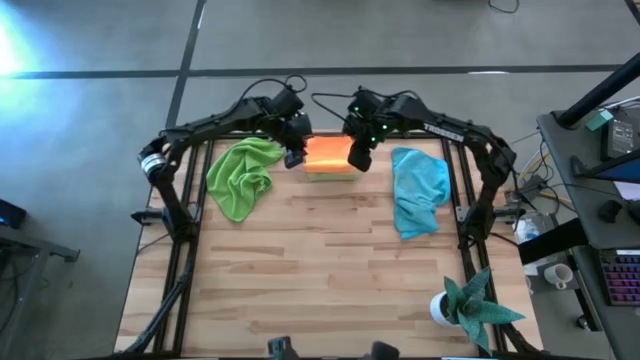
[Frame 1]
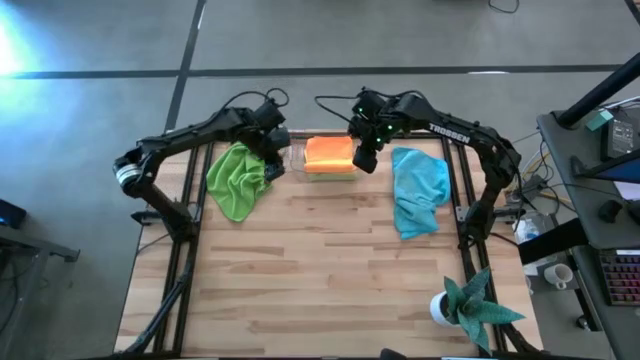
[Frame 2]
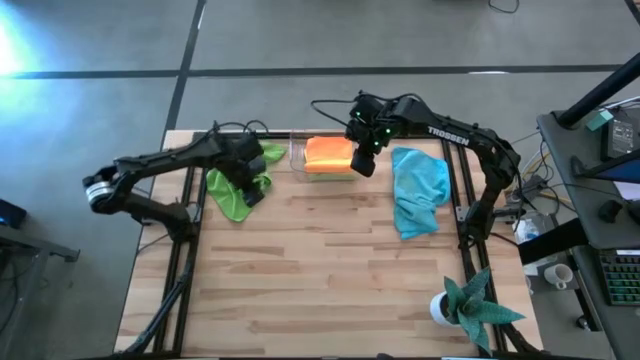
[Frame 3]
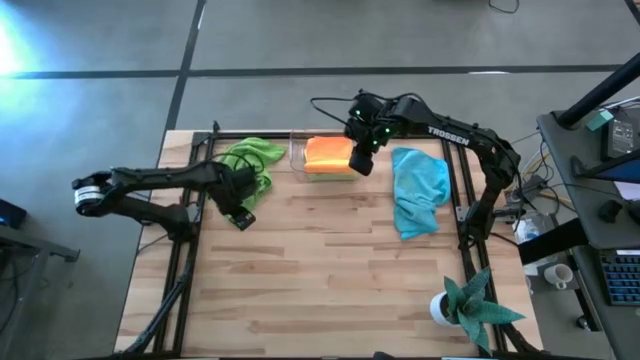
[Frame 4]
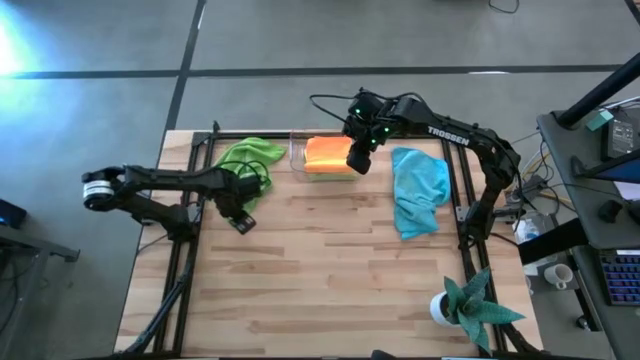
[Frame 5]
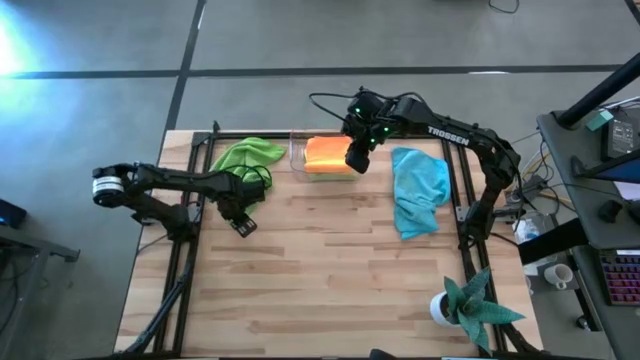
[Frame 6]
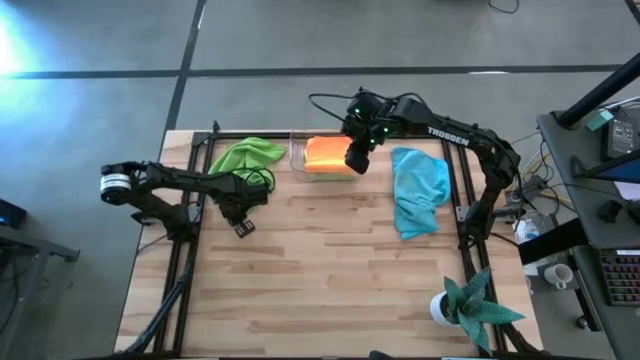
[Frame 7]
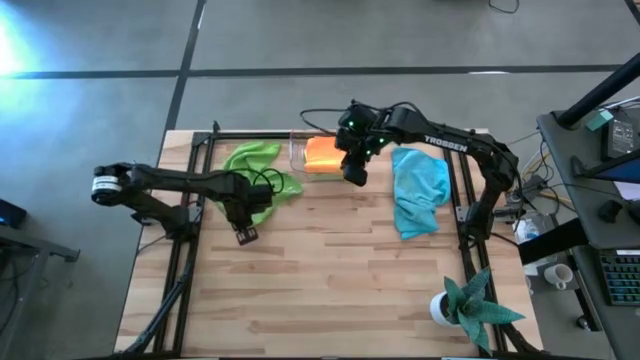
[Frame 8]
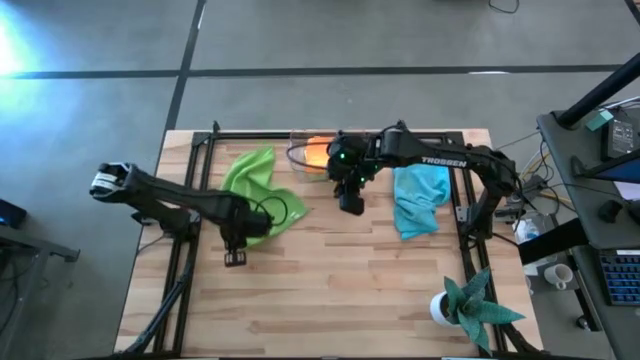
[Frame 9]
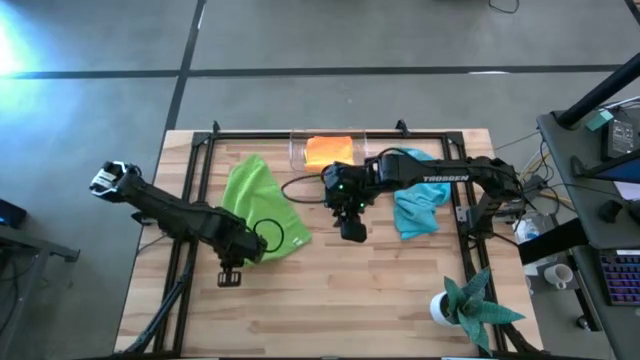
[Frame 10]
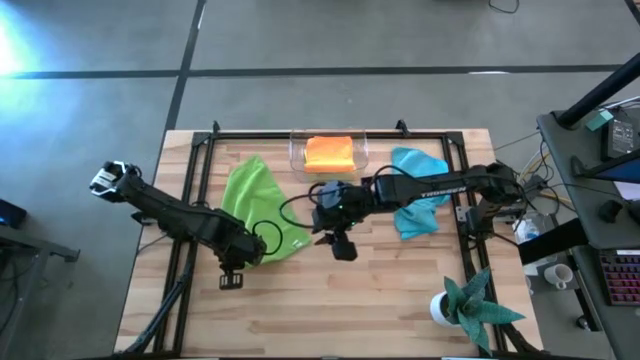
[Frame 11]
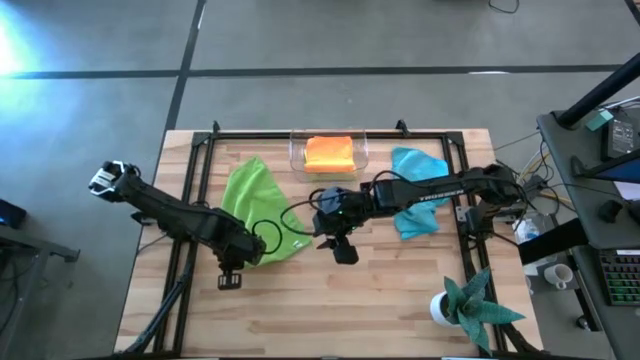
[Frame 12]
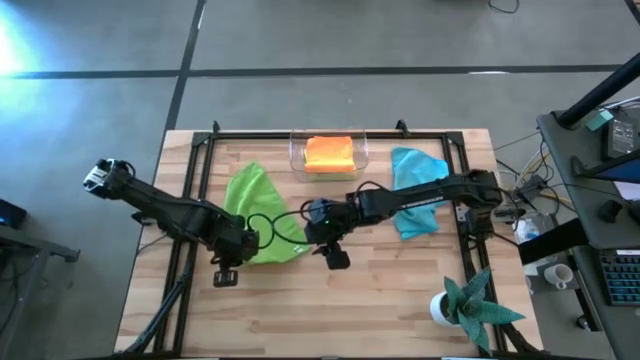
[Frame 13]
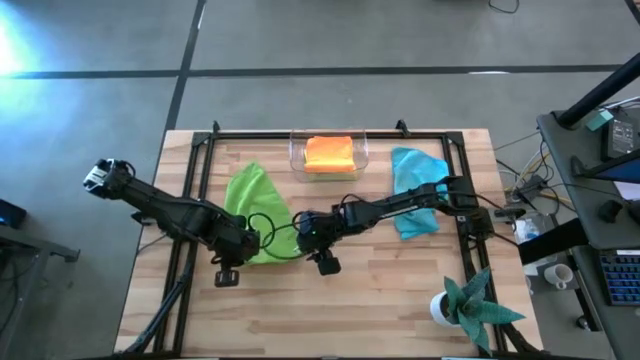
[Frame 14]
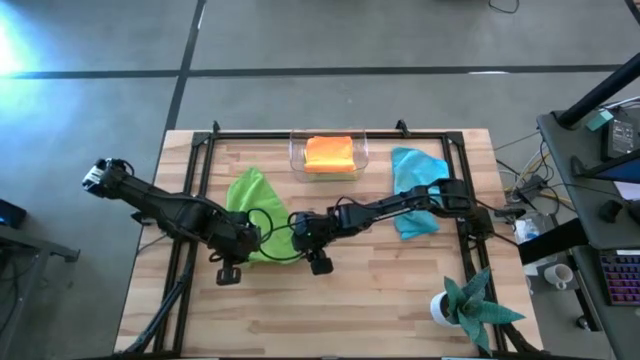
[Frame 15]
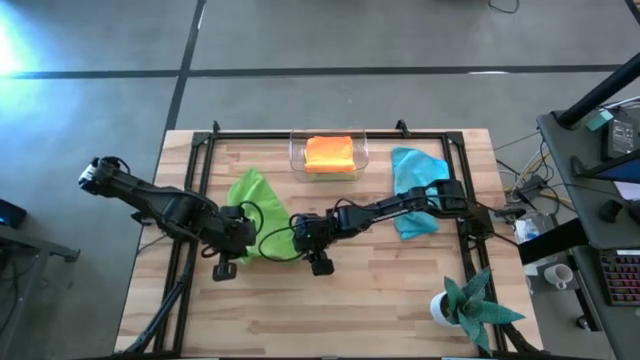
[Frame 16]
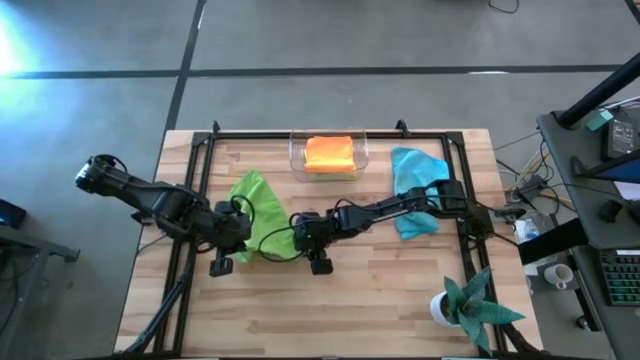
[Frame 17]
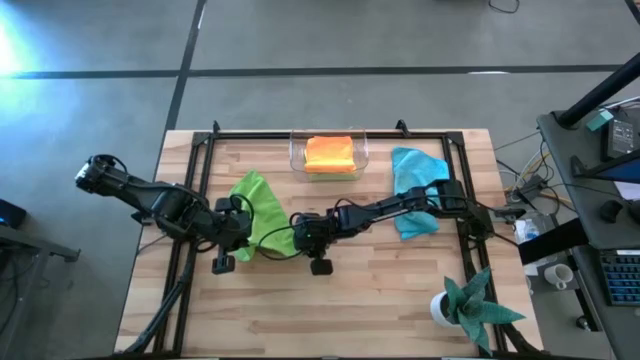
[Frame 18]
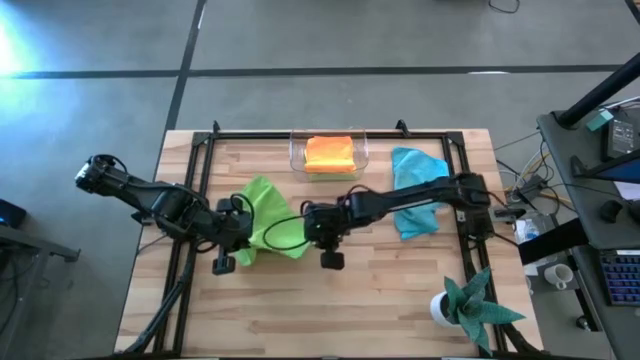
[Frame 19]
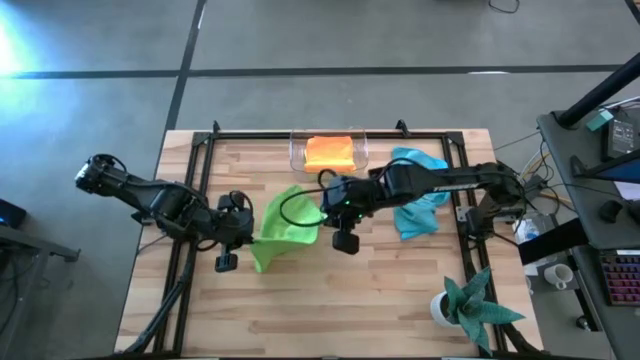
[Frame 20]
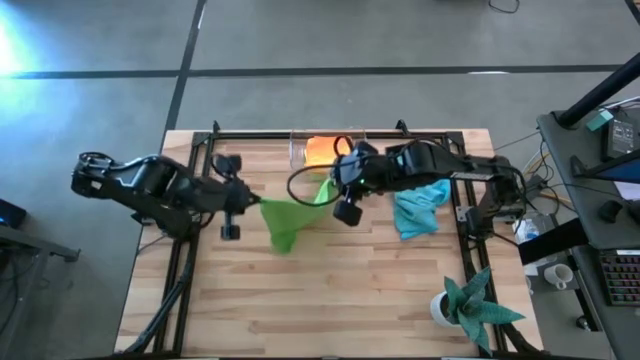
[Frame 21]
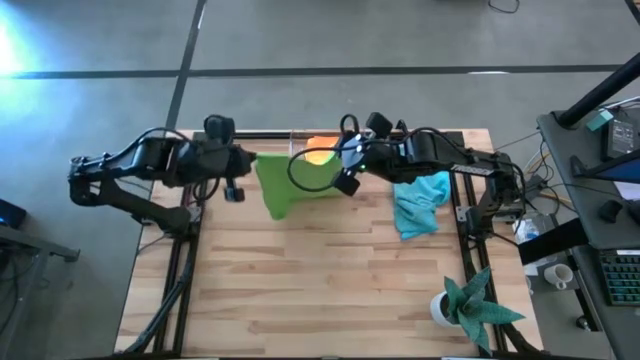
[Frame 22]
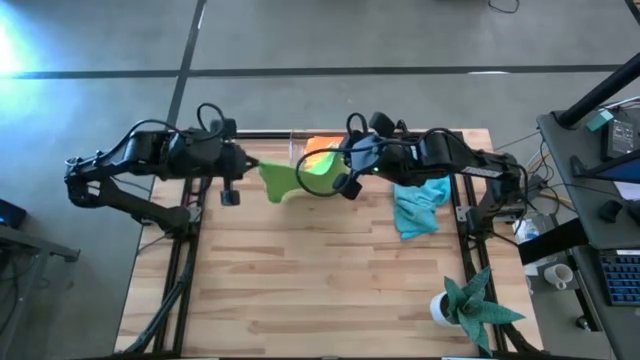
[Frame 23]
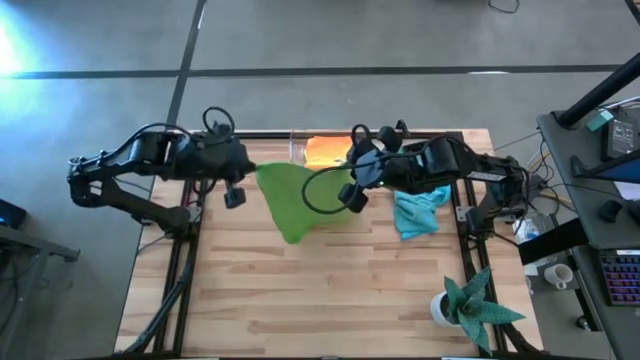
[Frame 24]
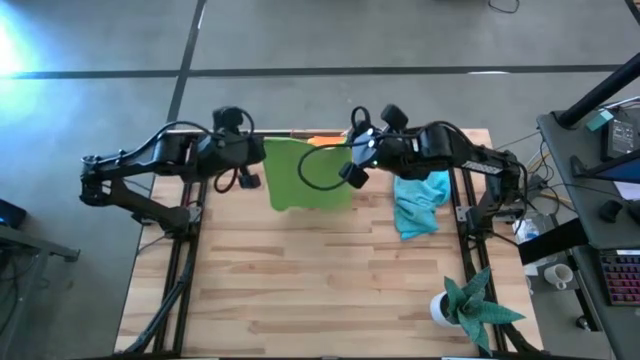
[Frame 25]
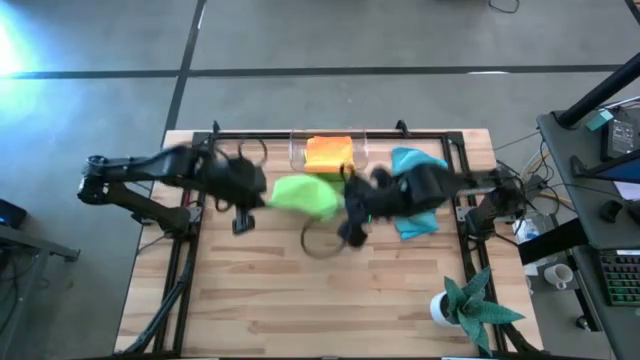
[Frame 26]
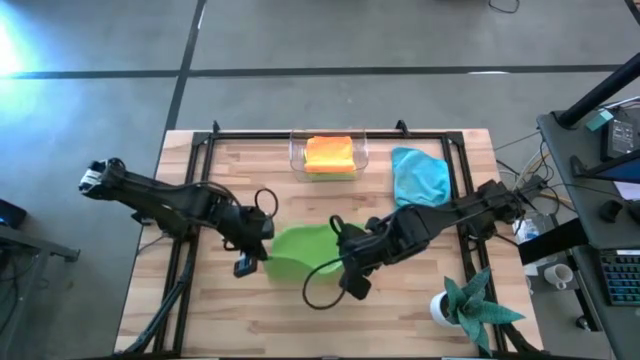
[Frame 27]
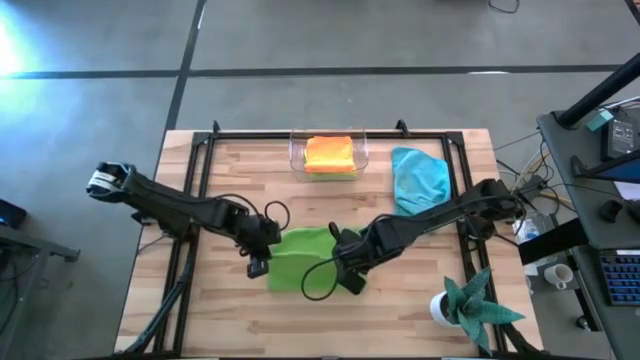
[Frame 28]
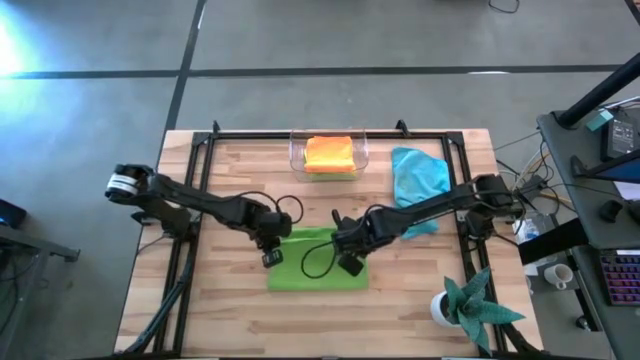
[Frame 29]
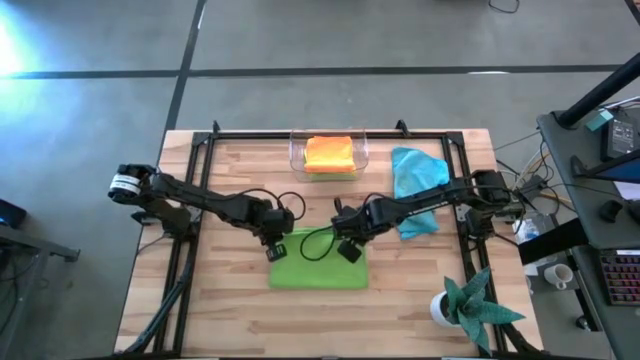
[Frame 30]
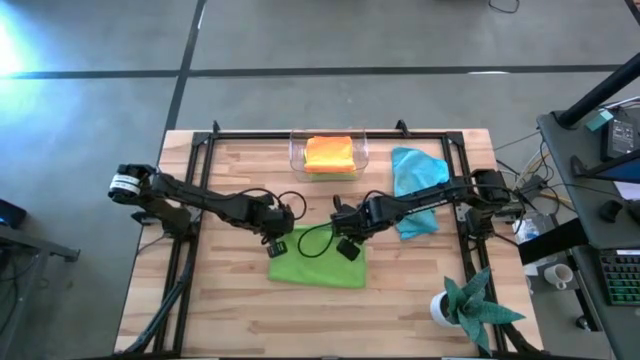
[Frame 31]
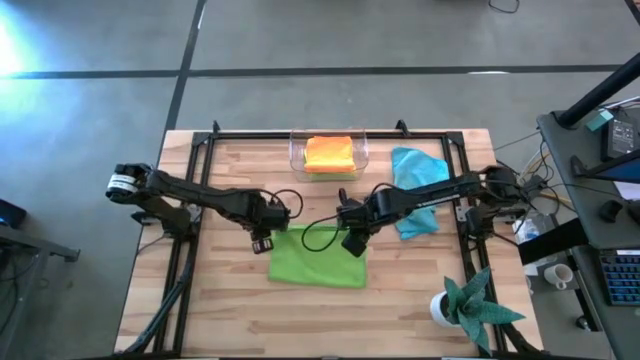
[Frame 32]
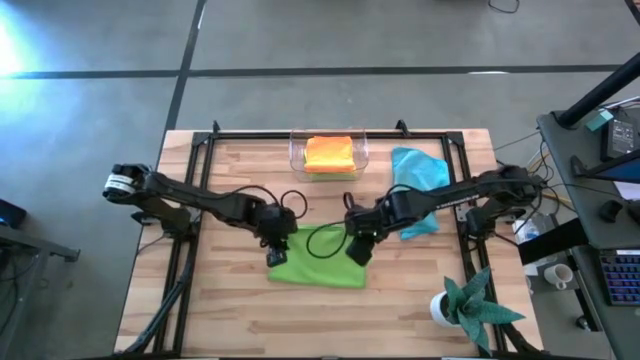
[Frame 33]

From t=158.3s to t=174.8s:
Task: Fold microfiber towels
Fold the green microfiber towel

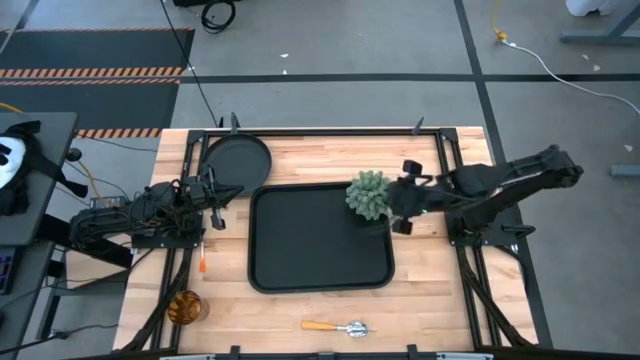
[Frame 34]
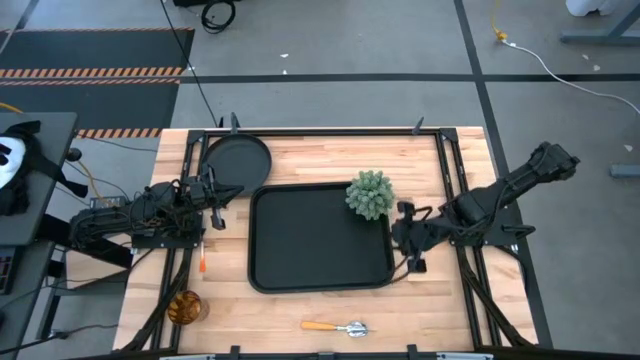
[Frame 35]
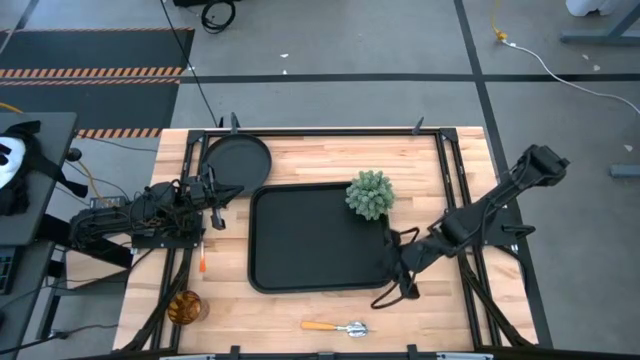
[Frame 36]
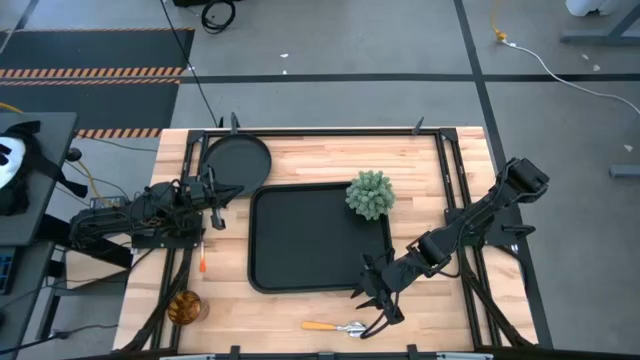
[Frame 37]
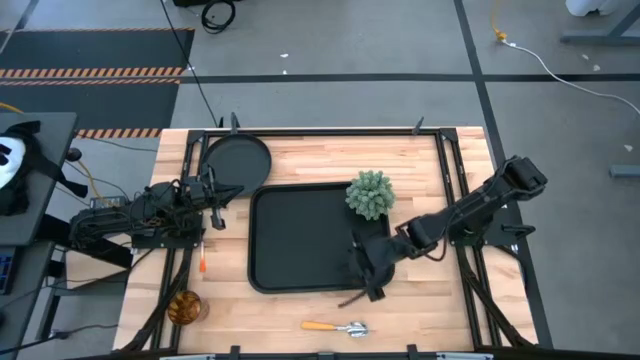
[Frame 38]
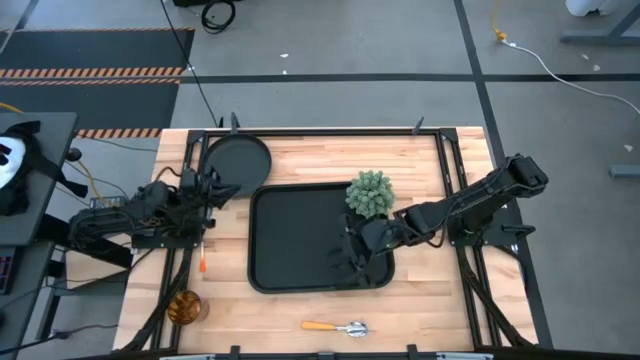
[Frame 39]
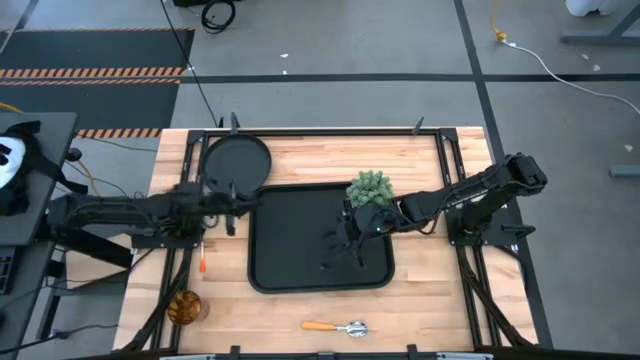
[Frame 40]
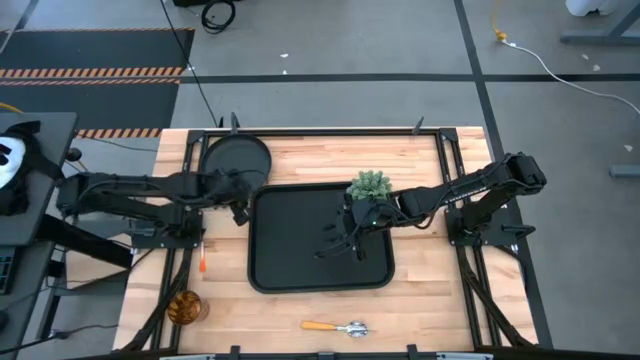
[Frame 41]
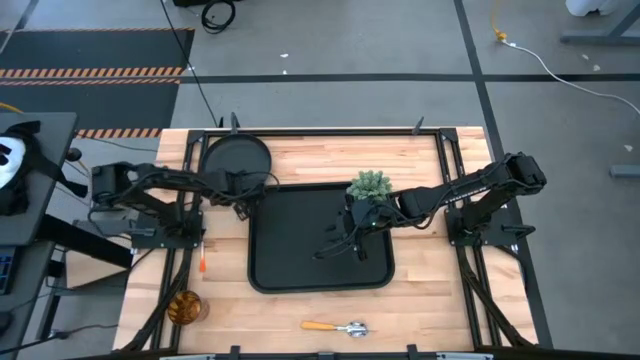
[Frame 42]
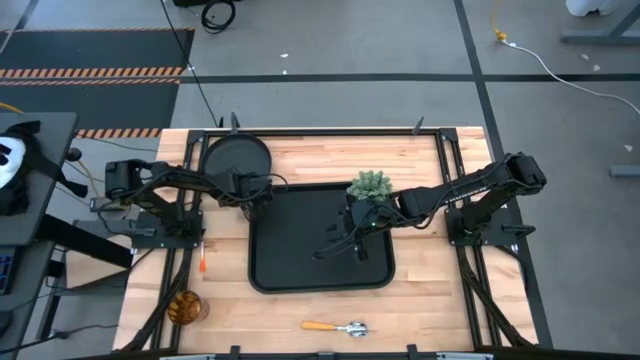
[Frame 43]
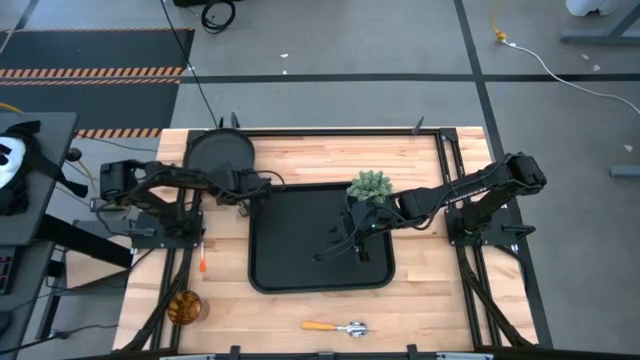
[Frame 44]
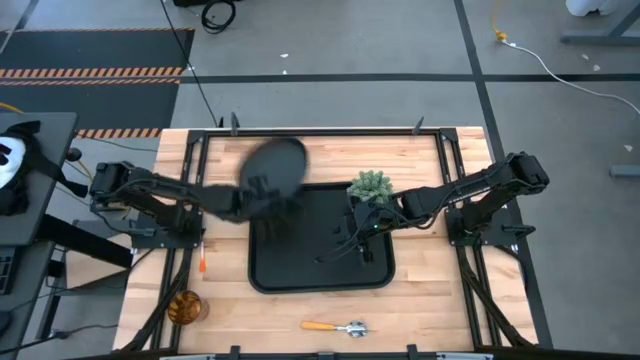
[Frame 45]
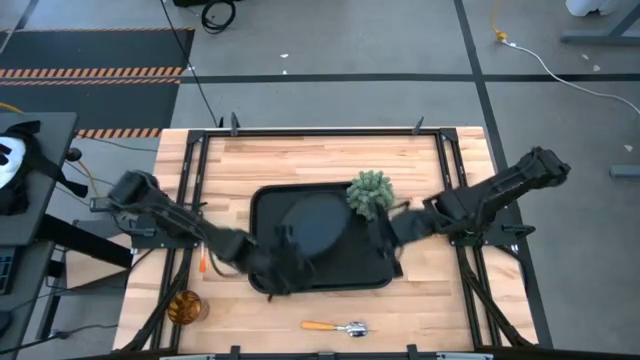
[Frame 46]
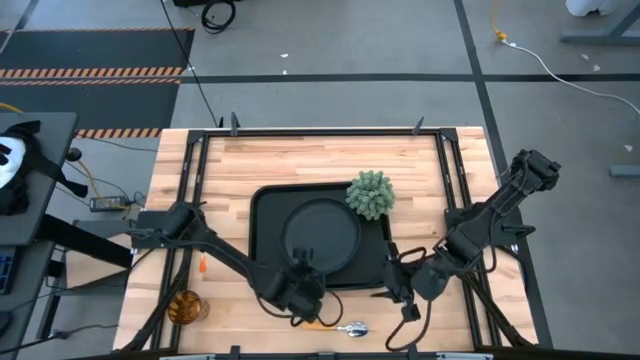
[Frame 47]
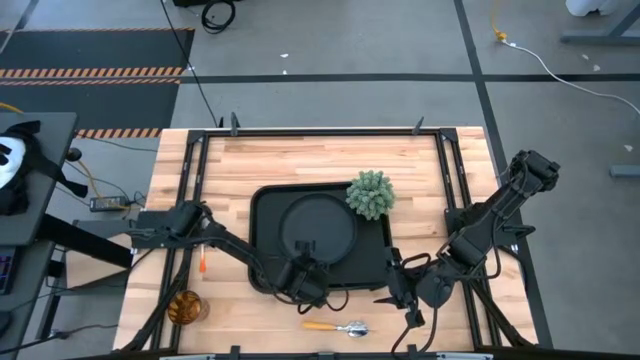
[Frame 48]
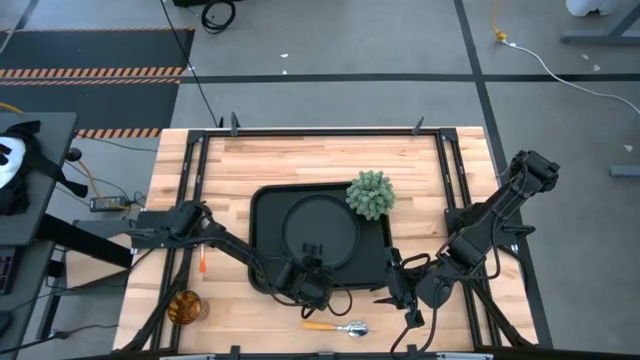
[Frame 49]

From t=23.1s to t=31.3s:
Task: Pick and place plate/cup/fork/spoon on tray
Put the black plate on the black tray to the left of the green potted plant
